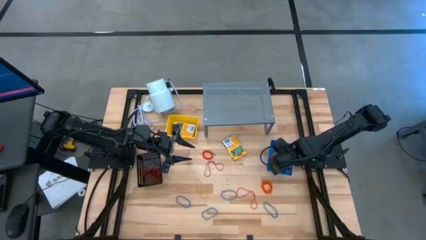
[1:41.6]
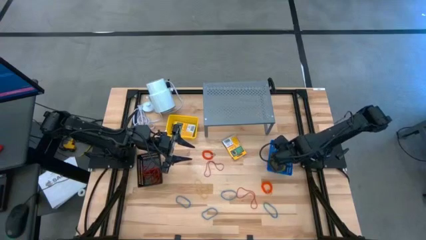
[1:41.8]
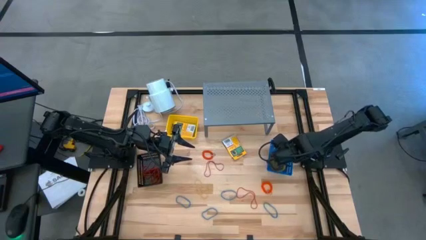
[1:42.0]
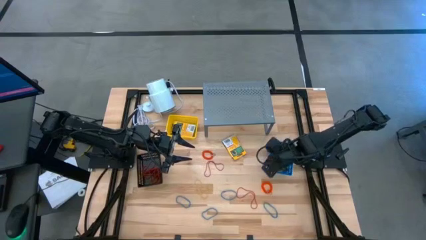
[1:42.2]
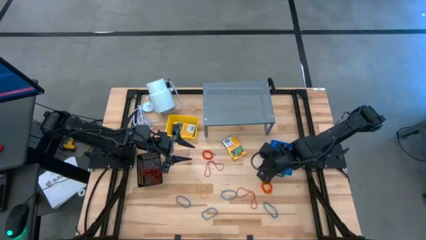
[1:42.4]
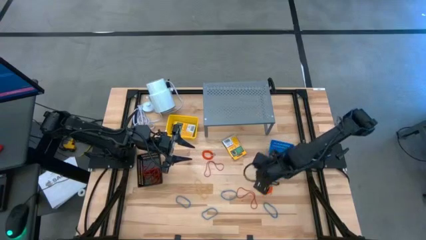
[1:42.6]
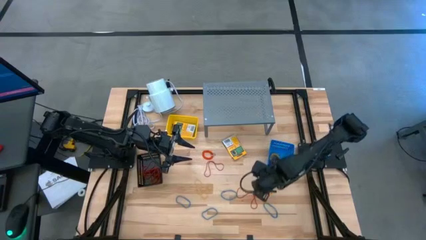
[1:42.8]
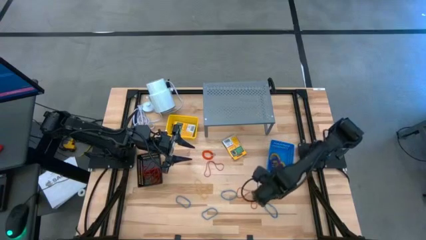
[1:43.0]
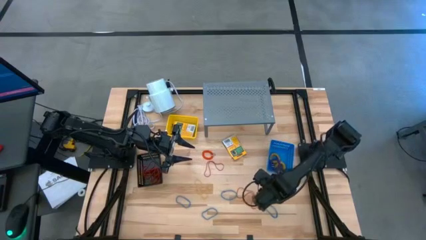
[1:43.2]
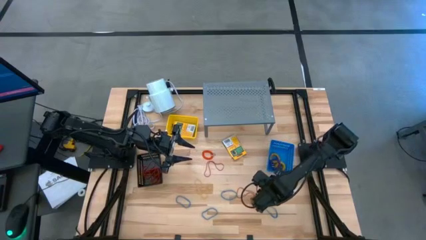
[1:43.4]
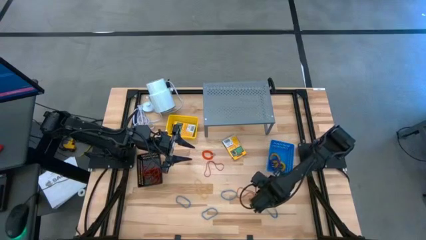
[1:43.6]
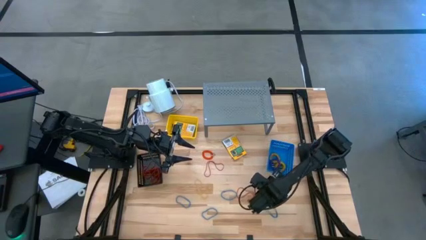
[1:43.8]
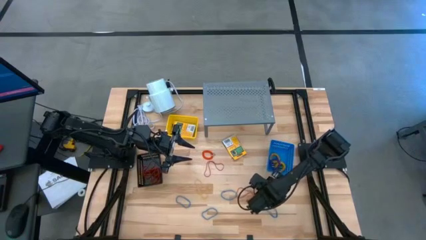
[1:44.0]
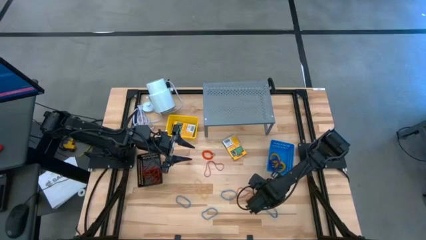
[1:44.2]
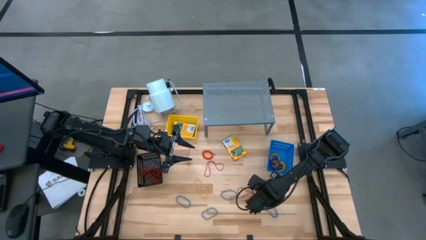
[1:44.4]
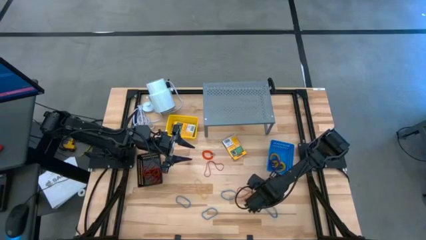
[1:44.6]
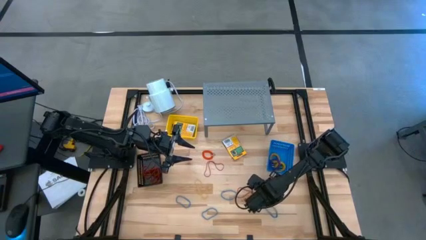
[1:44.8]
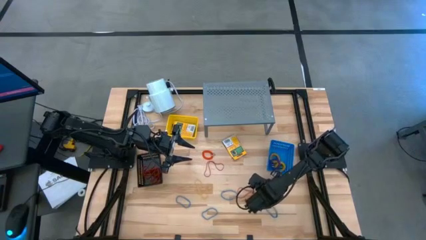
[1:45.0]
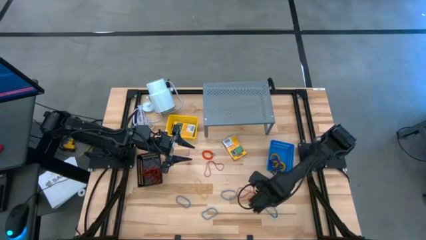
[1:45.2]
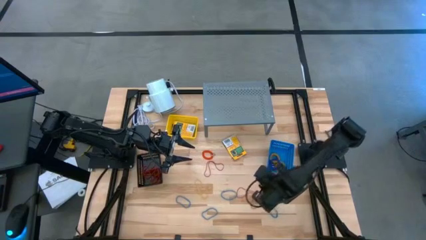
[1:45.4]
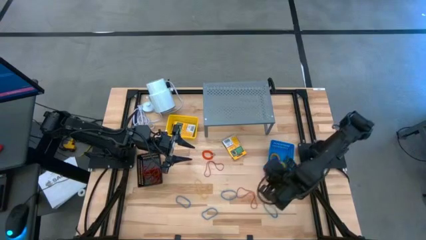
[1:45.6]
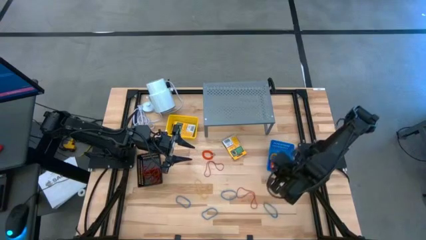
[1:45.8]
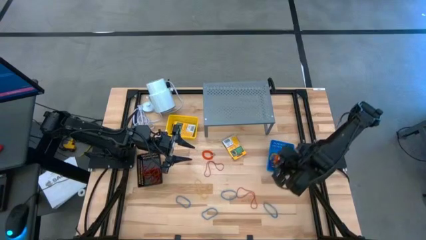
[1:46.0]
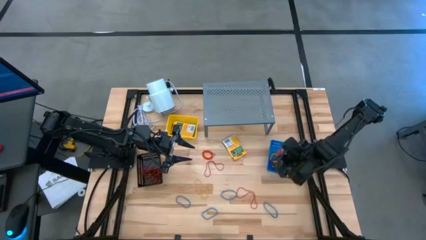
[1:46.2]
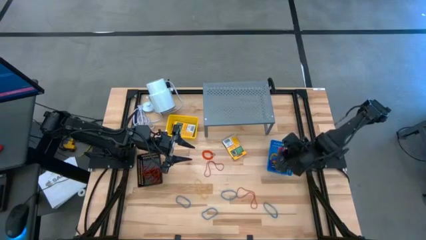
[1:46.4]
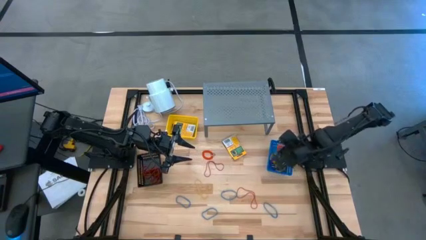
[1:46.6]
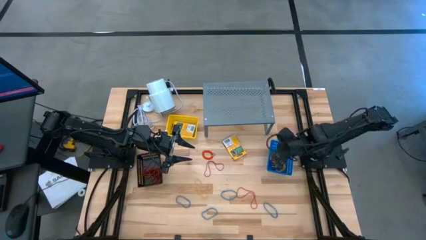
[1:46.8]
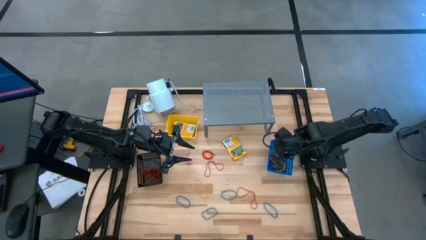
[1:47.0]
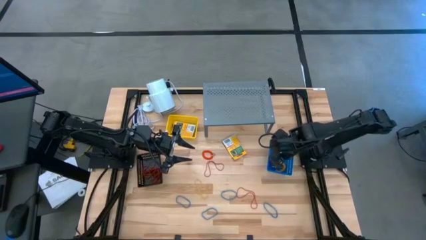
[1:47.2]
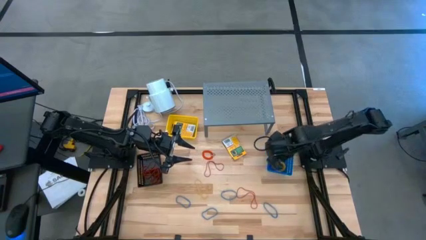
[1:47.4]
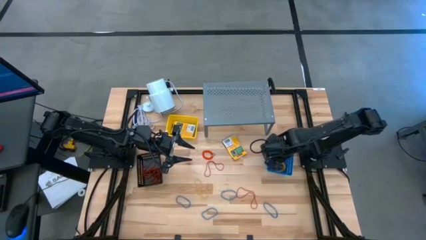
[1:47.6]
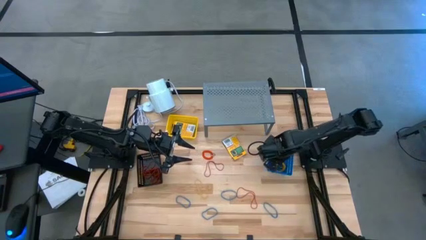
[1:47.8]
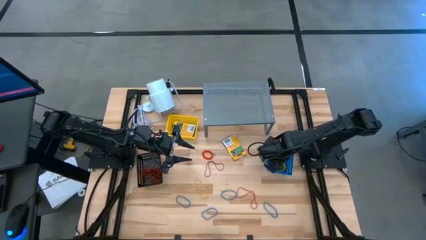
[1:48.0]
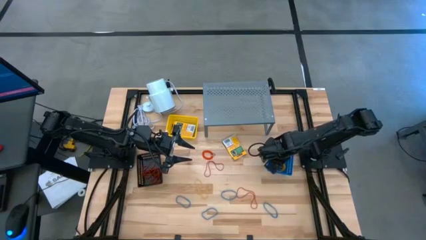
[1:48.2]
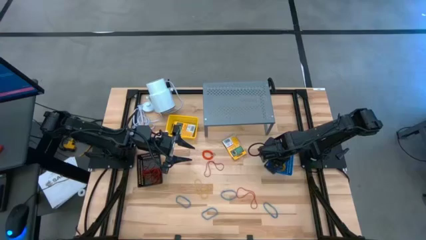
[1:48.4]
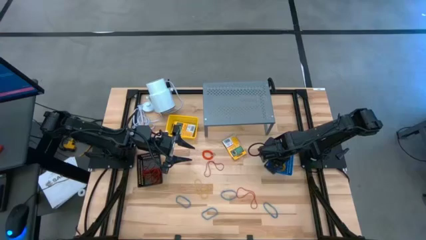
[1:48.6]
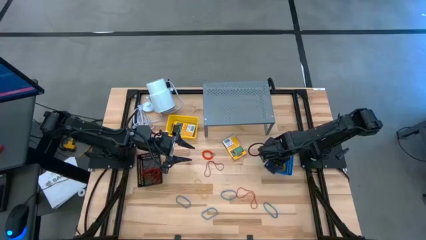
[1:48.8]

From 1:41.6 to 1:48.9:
Task: Pick & Place Office Desk Supplies
Put the orange spring keychain into the blue bin

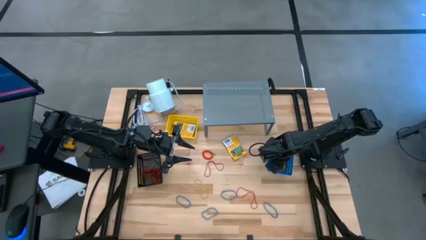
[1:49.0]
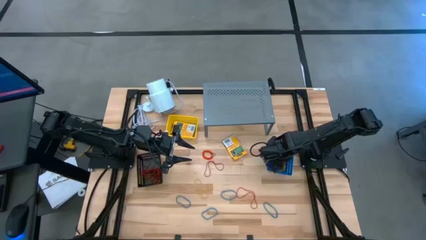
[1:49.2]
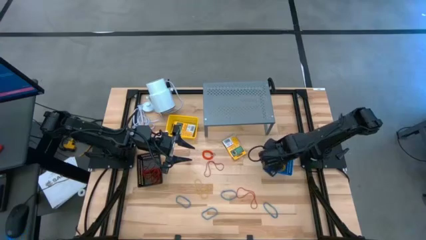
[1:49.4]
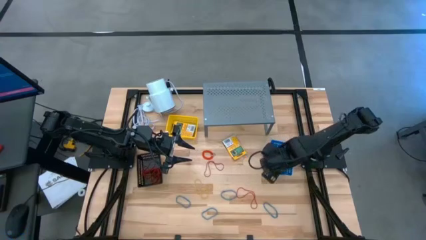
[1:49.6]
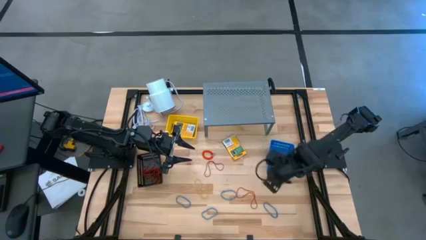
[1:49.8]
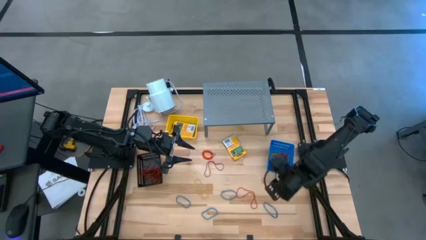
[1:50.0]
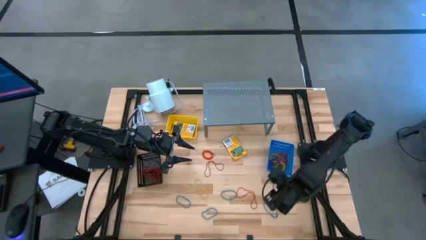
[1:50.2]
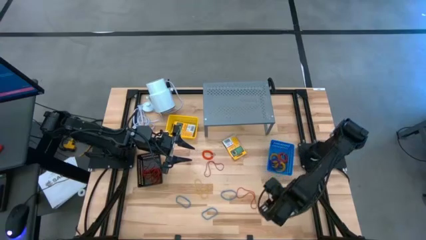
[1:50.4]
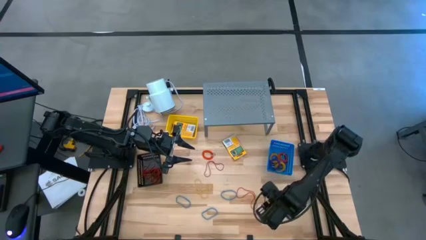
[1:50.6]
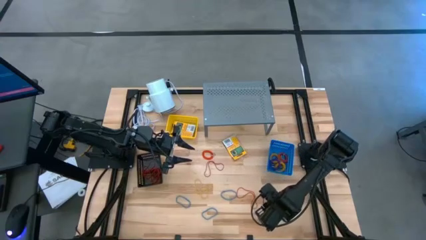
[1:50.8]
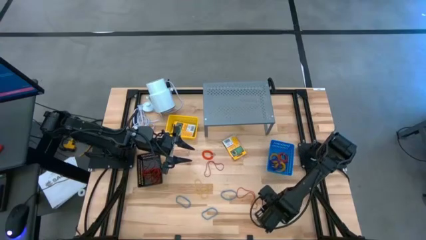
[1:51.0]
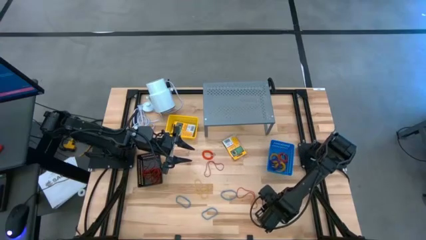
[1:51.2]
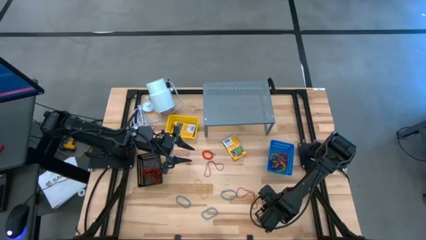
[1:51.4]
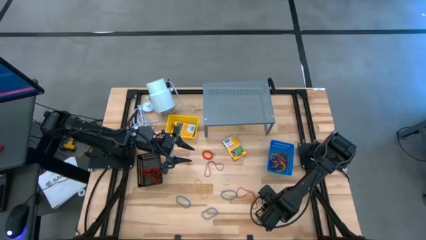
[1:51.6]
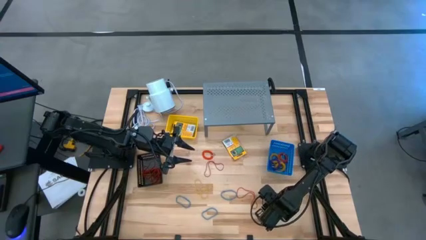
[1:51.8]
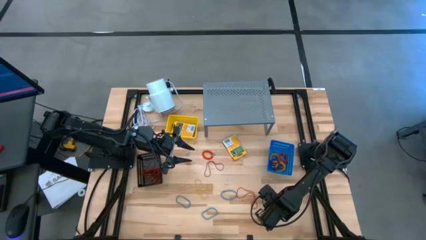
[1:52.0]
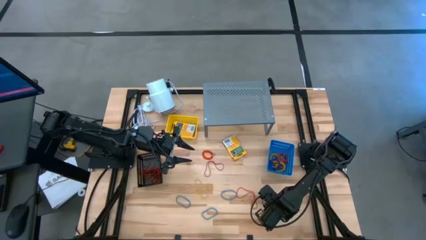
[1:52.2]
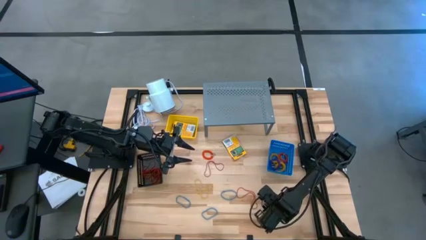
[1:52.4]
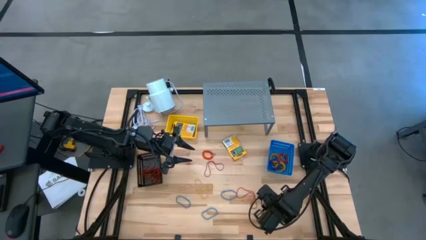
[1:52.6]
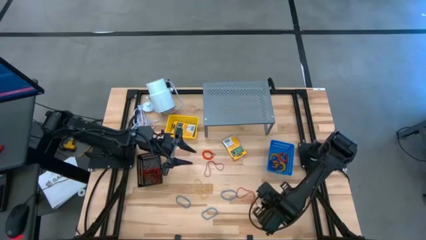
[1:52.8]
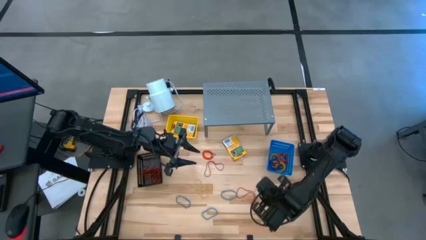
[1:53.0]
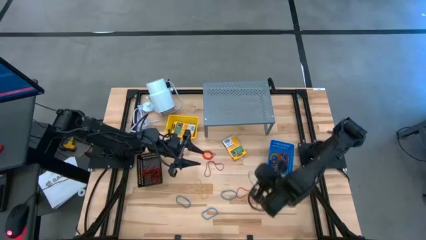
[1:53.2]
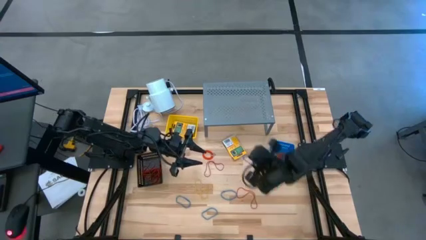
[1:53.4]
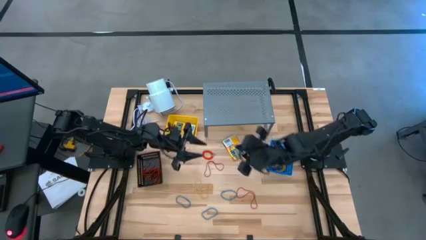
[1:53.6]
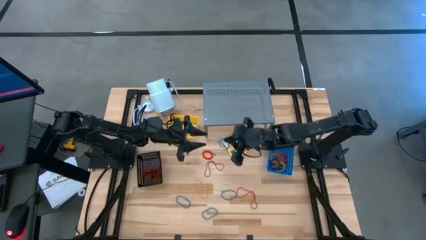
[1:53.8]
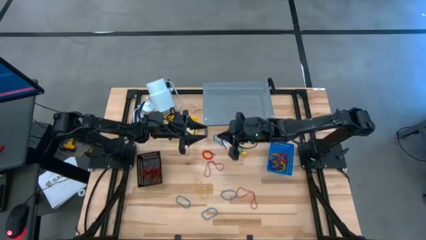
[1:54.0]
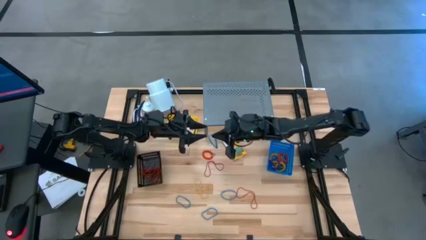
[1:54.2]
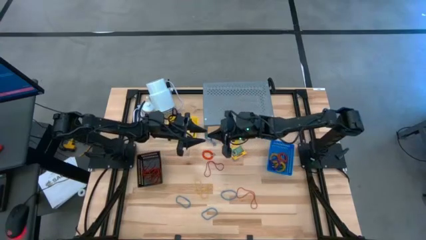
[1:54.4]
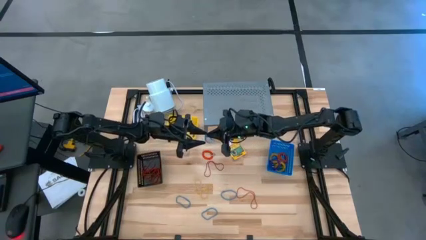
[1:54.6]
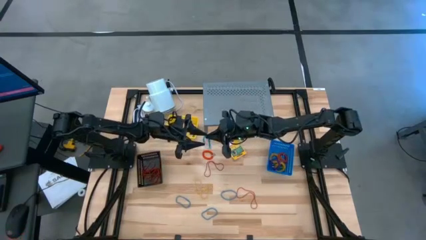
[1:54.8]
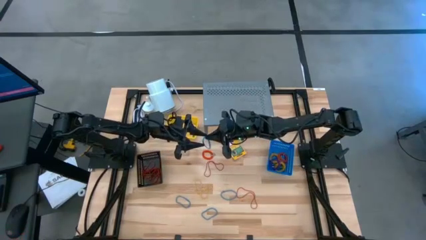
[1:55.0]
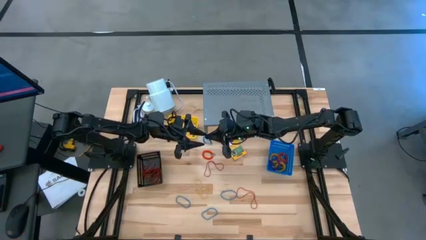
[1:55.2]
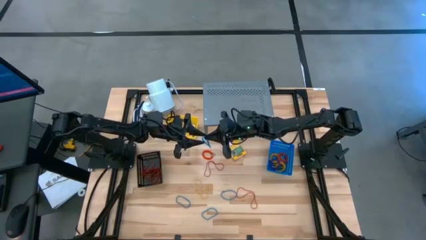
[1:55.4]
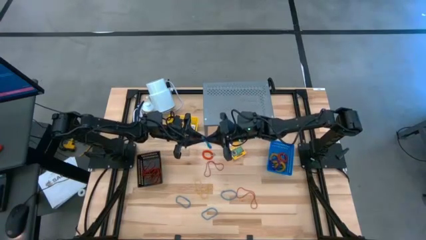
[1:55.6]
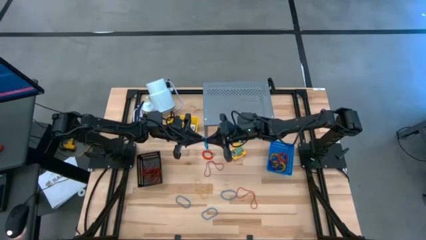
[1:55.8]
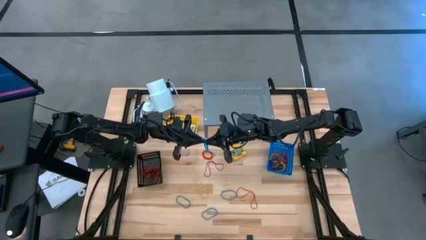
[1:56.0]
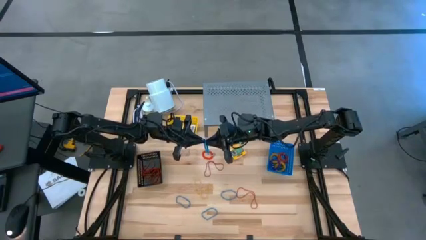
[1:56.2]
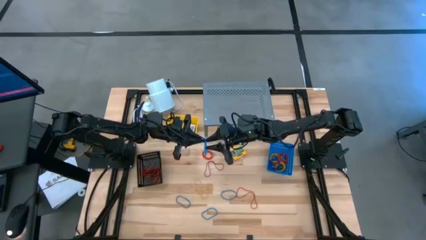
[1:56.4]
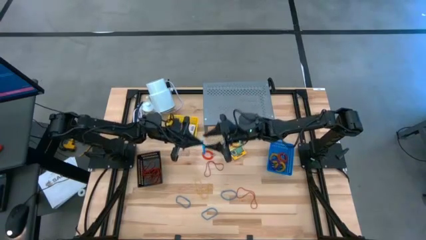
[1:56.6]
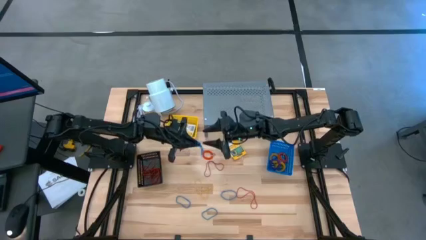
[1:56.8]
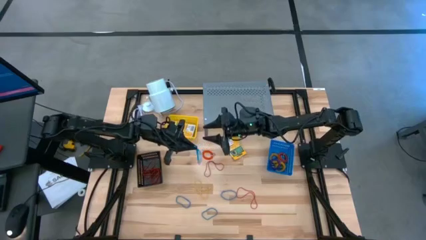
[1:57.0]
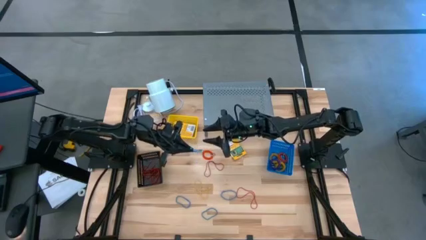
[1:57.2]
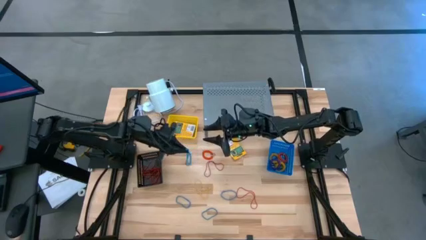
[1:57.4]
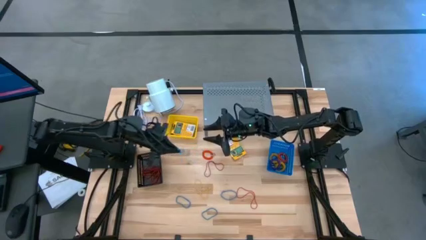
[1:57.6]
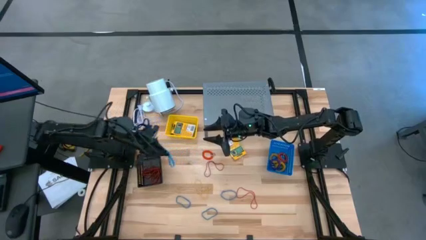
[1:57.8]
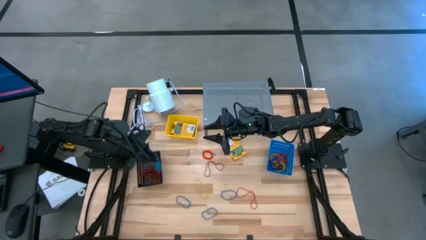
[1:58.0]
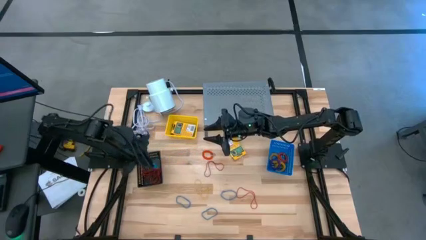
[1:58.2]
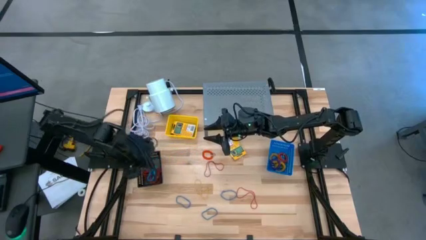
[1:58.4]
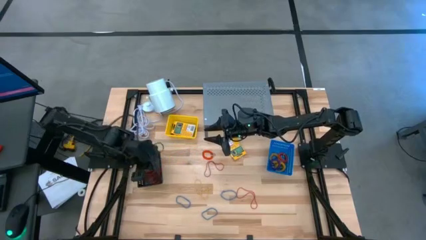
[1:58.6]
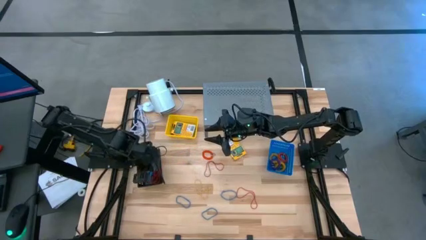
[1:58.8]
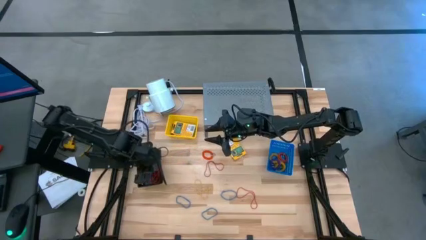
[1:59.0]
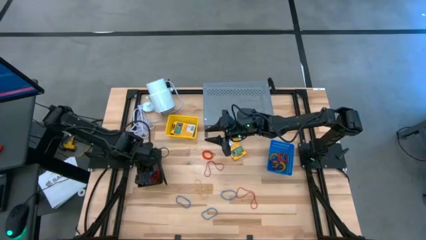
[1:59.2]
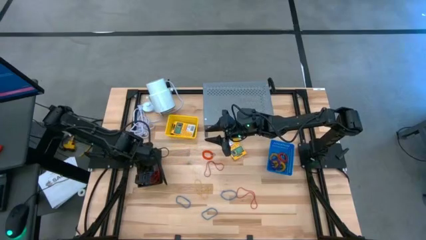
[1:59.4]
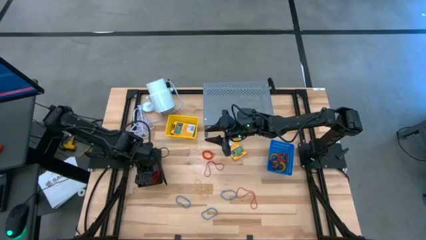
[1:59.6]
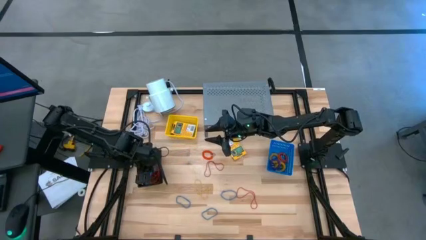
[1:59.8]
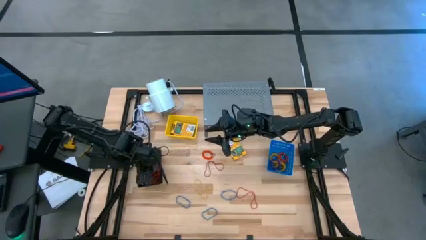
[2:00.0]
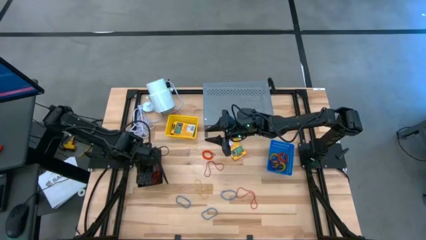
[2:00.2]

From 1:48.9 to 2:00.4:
Put the blue rubber band into the black bin
